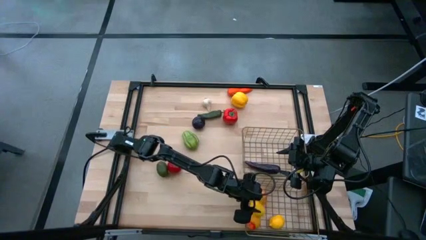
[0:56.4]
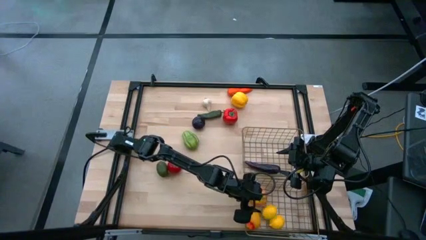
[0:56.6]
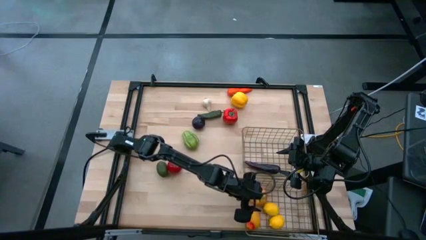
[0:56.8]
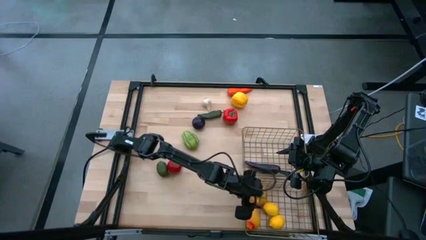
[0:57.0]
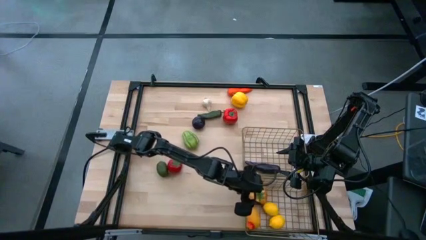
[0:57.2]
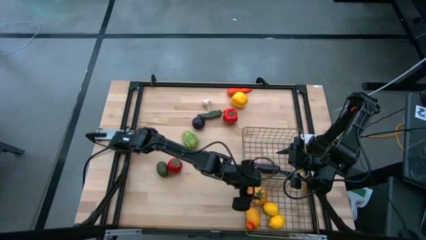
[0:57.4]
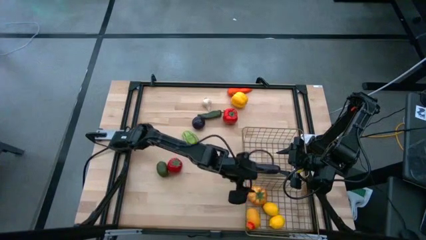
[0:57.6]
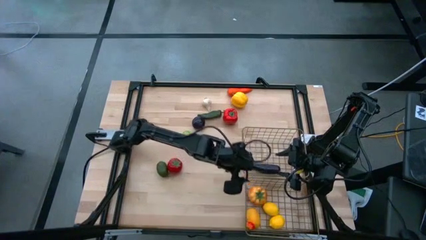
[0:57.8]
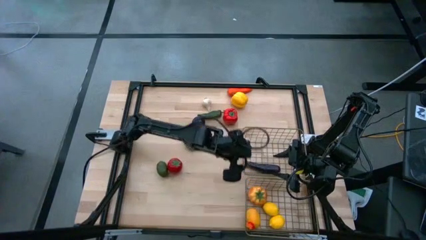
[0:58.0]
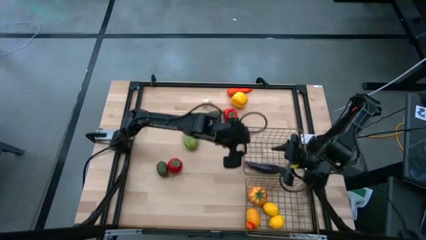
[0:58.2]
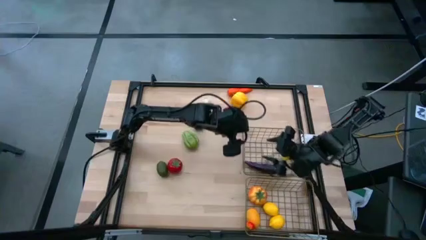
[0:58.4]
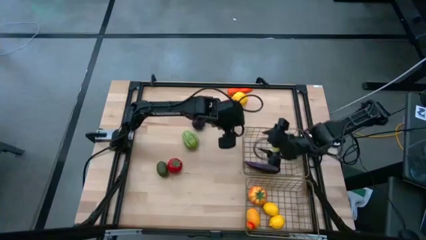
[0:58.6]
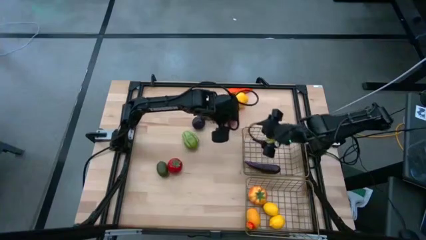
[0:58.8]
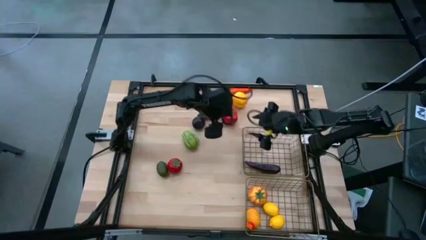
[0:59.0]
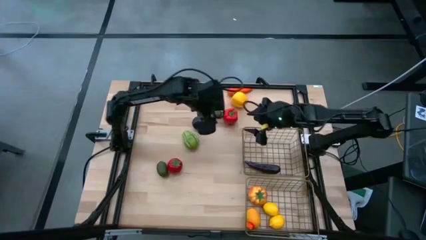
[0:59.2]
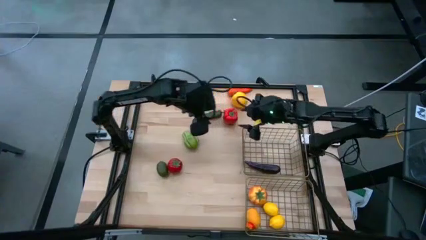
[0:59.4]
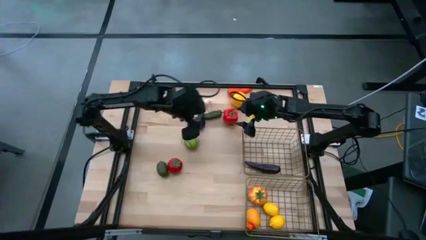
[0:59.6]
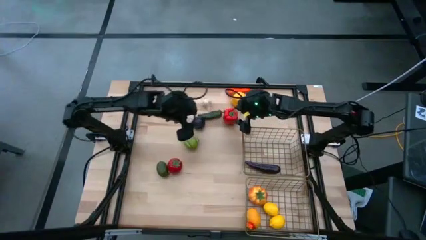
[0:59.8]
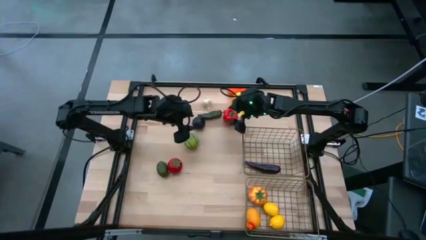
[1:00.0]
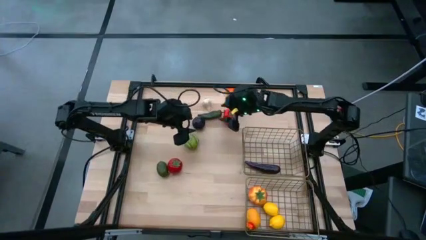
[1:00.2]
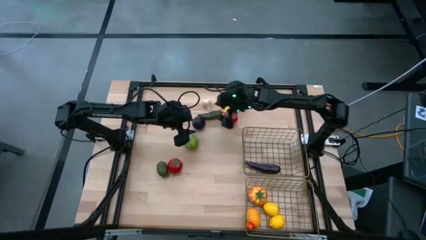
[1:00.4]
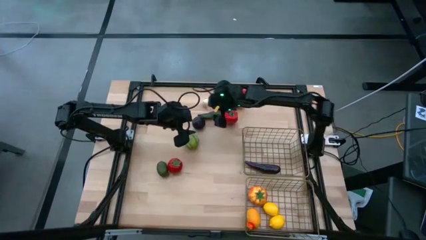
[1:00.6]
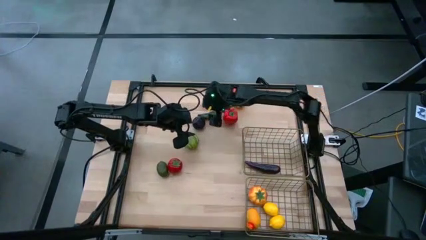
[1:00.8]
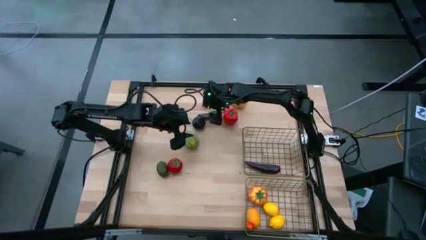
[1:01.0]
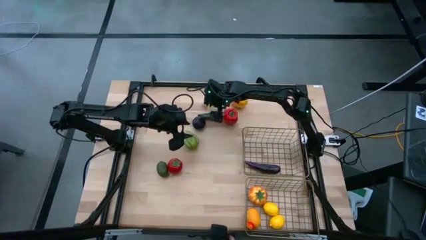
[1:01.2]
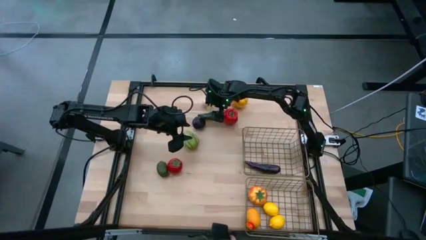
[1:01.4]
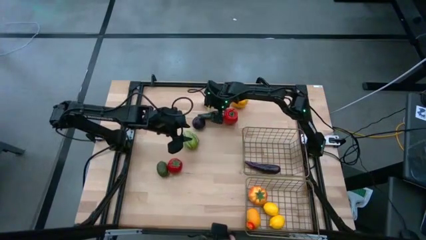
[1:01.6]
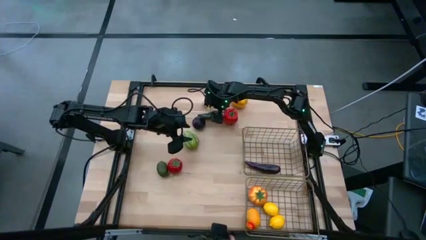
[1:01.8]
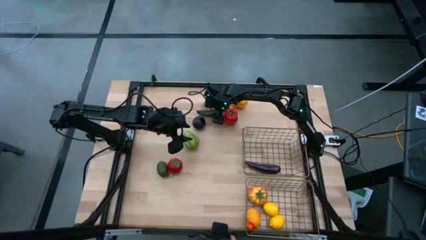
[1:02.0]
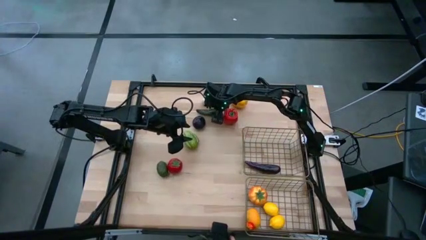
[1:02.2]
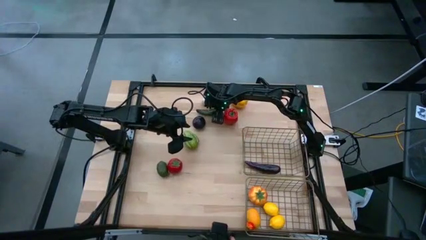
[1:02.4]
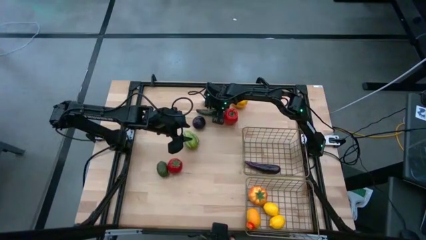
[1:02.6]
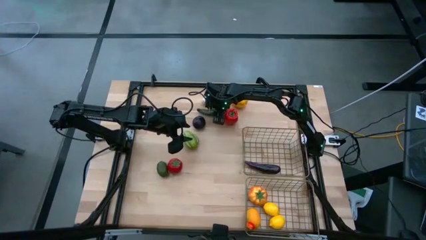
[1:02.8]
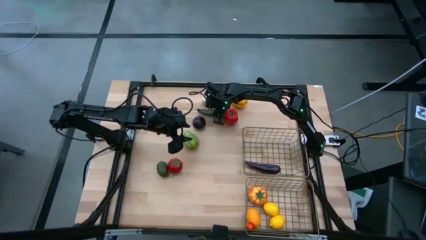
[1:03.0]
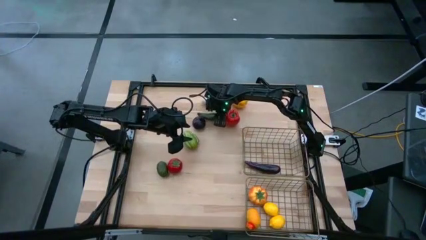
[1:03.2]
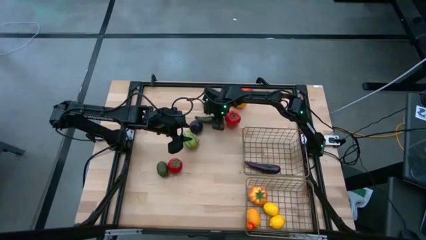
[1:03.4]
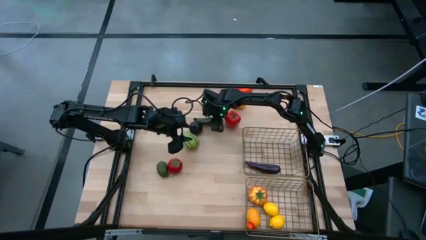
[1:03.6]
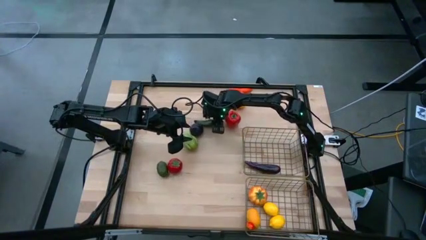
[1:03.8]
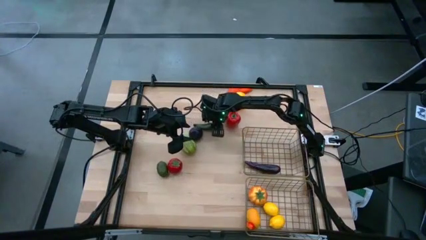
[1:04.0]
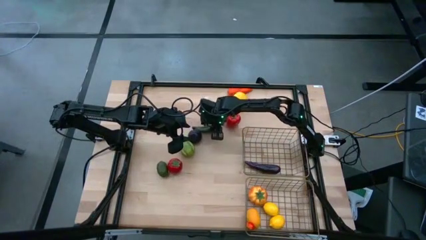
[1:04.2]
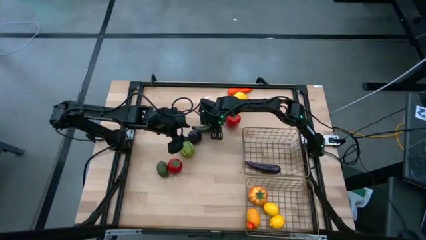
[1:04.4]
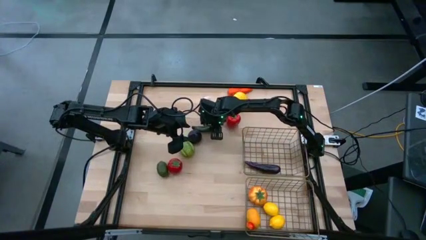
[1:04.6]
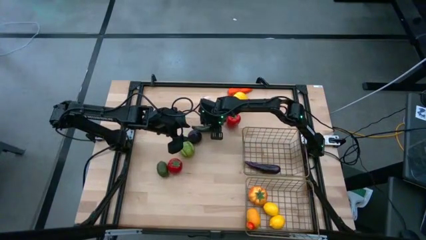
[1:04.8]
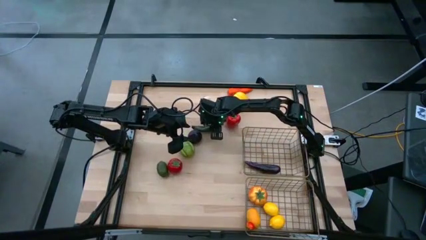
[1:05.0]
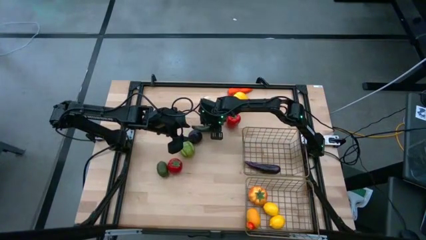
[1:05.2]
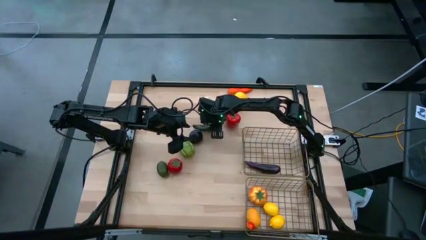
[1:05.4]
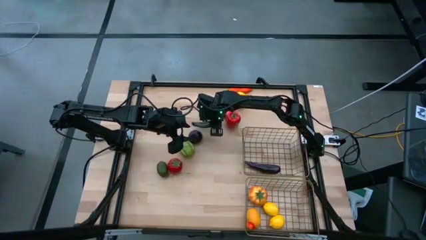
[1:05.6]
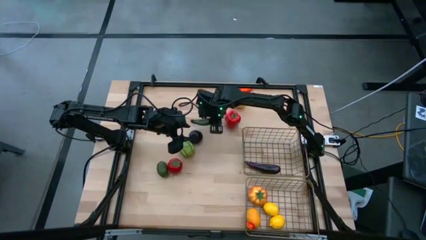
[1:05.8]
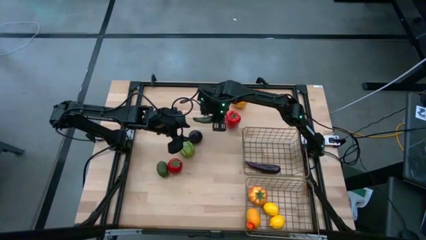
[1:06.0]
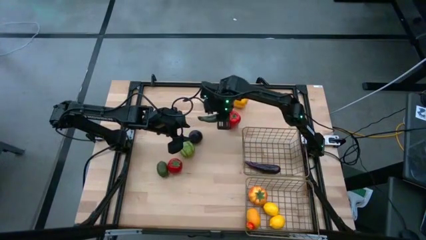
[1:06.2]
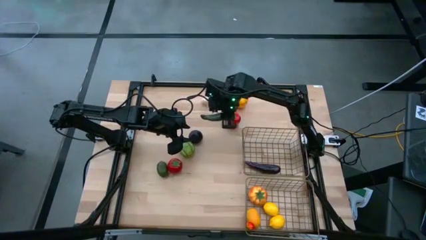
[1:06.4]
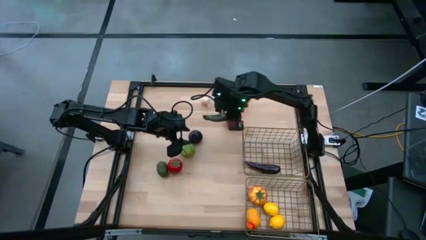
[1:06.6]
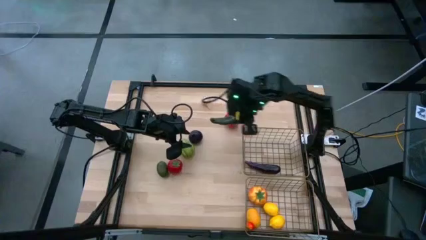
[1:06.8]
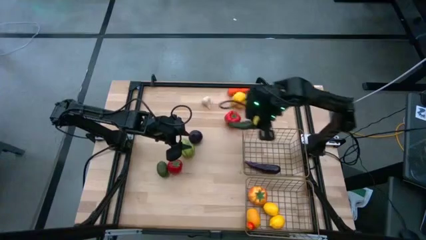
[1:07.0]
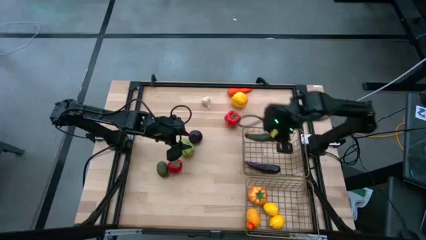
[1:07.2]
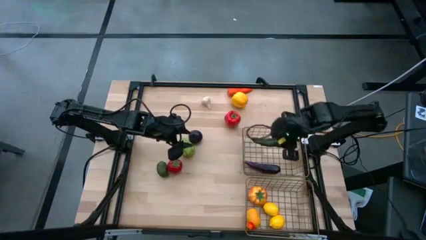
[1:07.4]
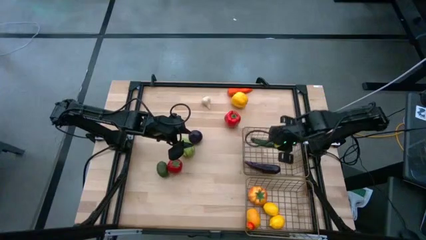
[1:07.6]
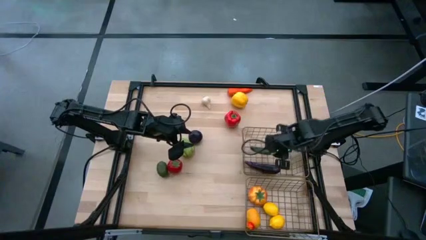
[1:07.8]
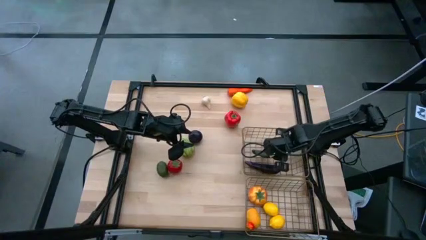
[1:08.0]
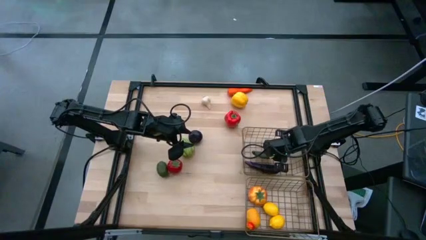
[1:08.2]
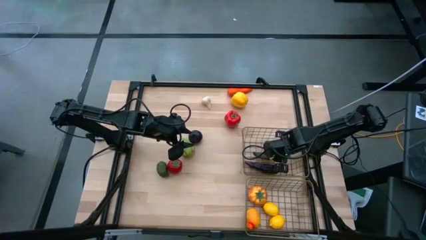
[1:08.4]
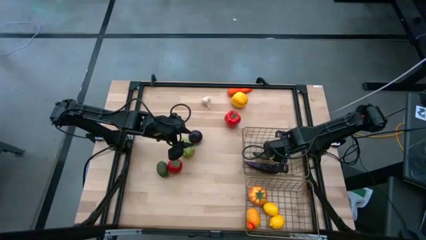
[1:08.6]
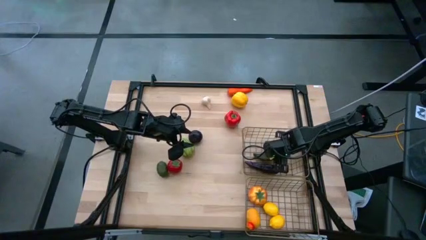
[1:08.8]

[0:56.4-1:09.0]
Task: Sort produce into baskets
Put the chili pepper into the top wire basket

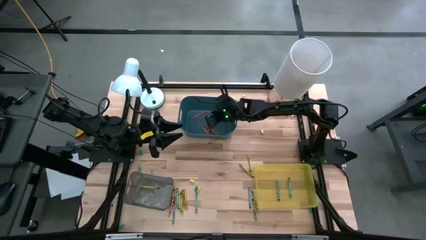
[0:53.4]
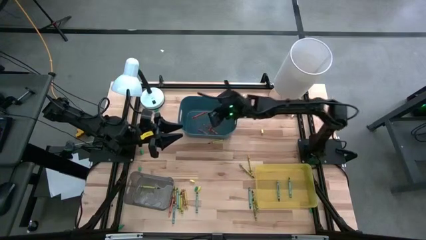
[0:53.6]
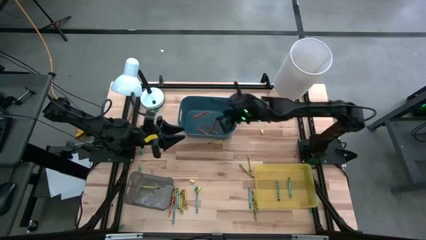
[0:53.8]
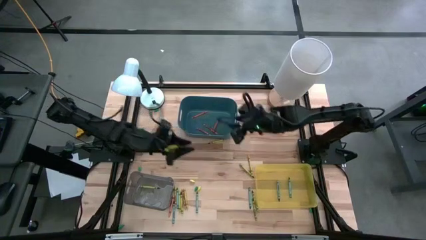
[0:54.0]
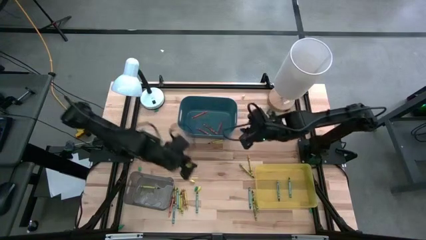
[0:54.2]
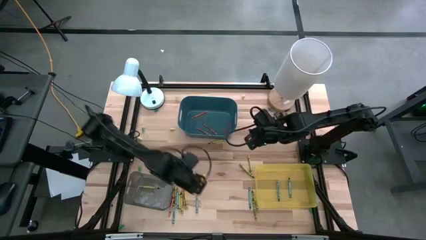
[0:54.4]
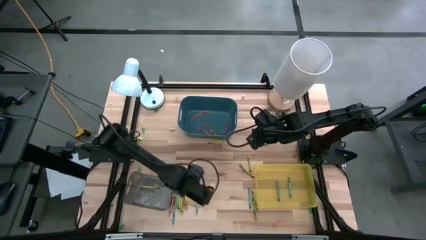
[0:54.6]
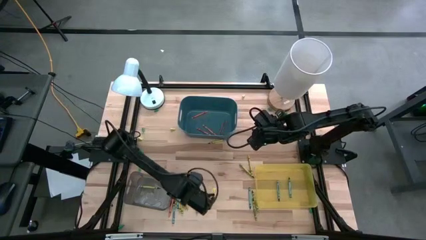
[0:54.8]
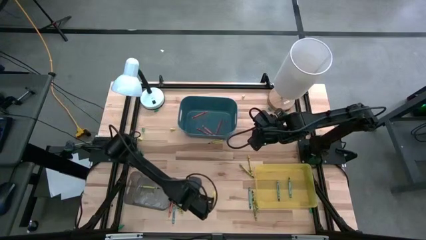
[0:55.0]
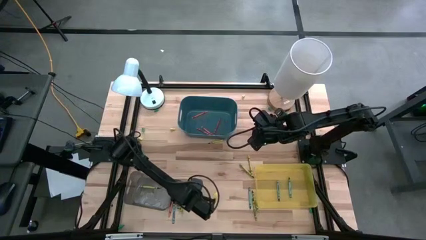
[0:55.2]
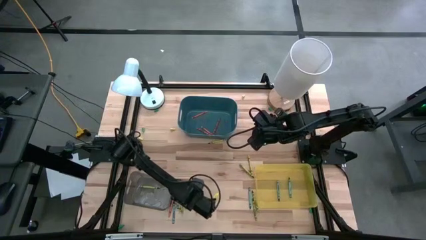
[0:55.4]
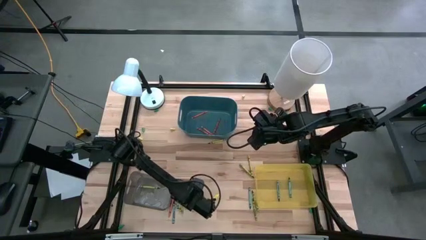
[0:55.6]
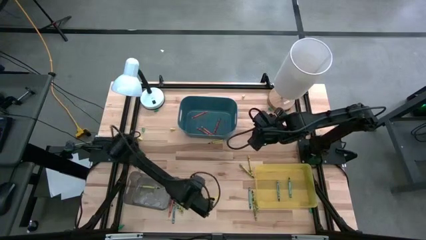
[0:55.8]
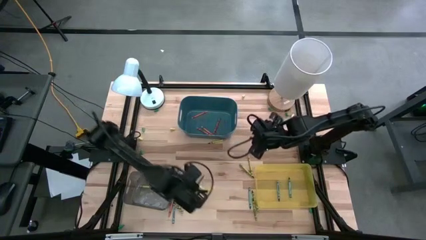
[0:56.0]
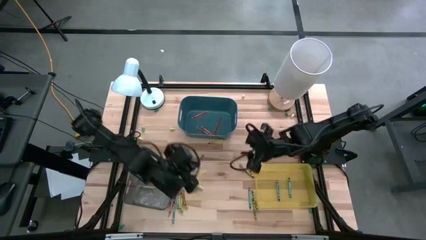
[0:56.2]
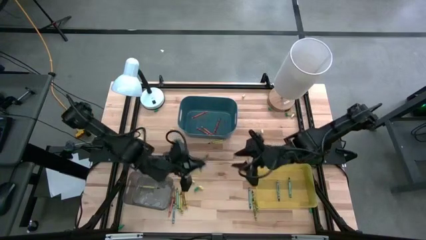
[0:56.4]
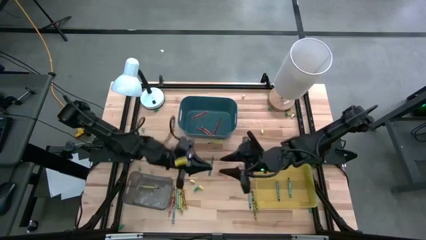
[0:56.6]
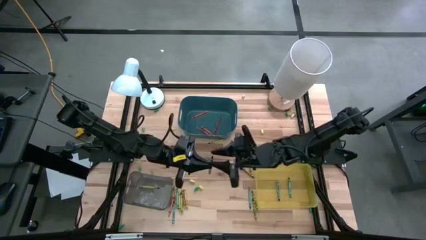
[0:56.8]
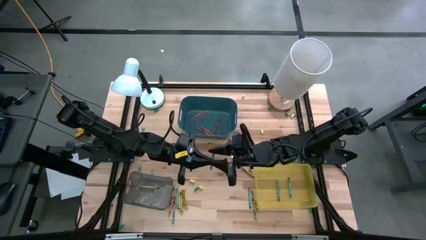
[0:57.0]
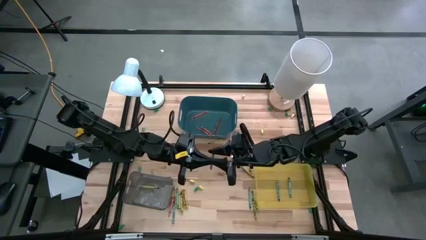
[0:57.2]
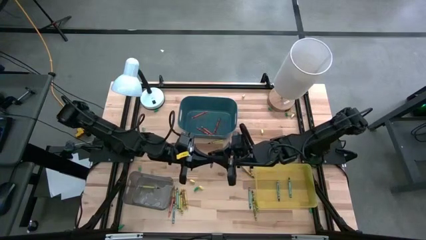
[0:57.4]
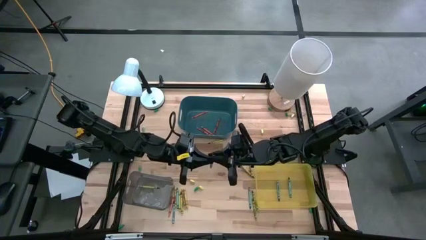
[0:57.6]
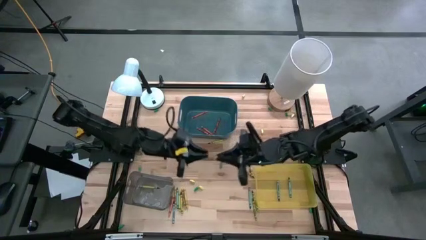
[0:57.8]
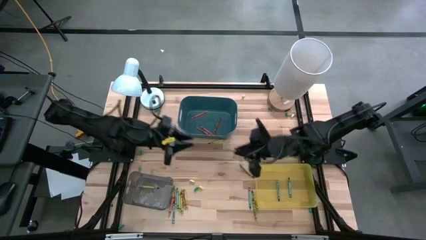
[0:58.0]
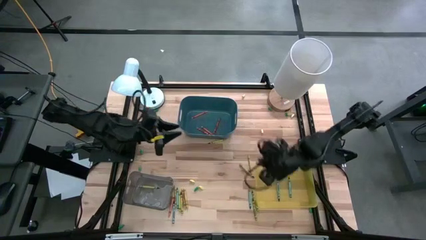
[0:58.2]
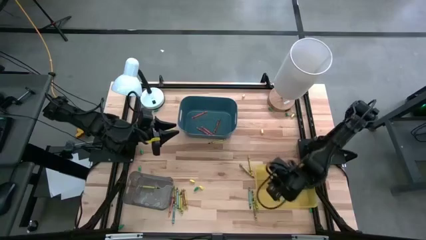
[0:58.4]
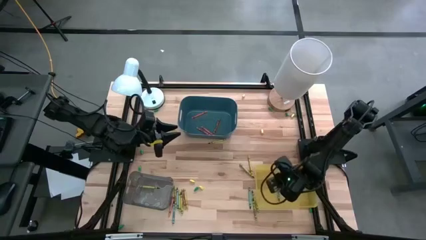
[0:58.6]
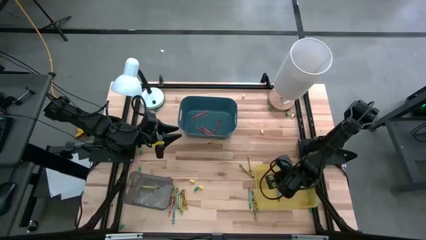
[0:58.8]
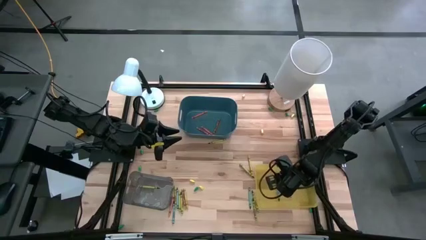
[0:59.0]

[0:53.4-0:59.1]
Task: Sort crayons
Put the blue crayon into the yellow bin
